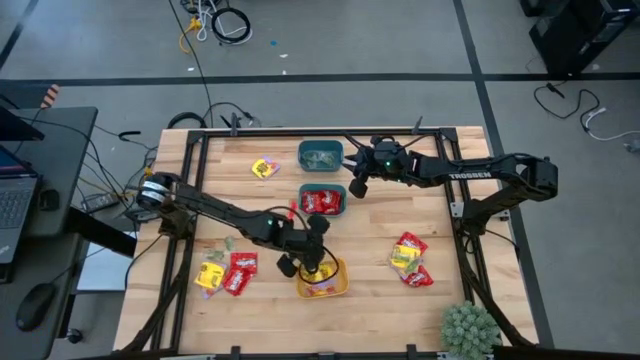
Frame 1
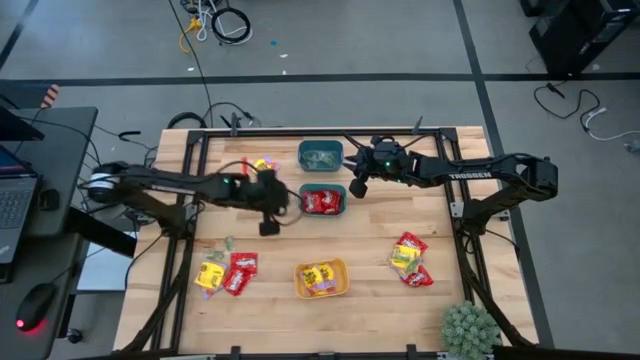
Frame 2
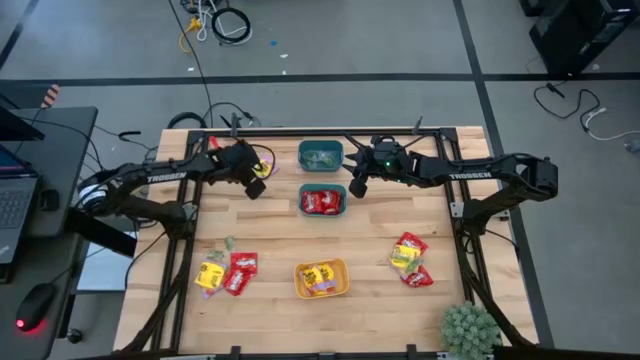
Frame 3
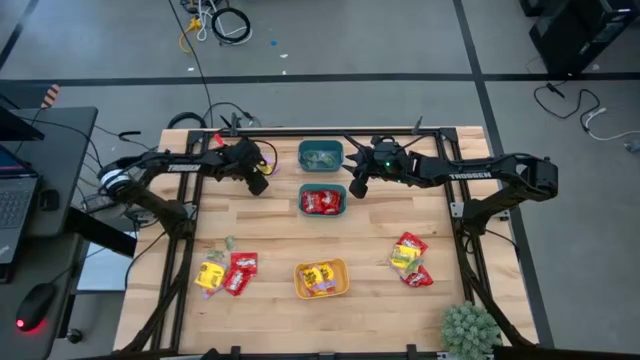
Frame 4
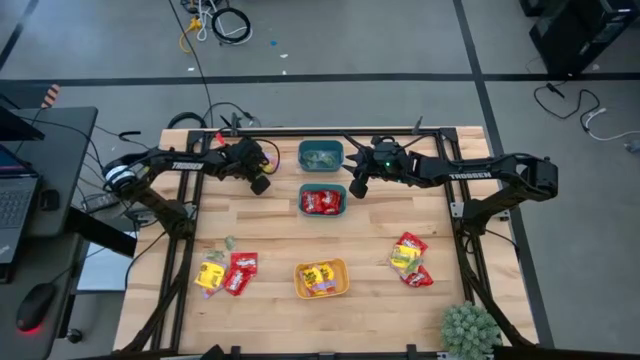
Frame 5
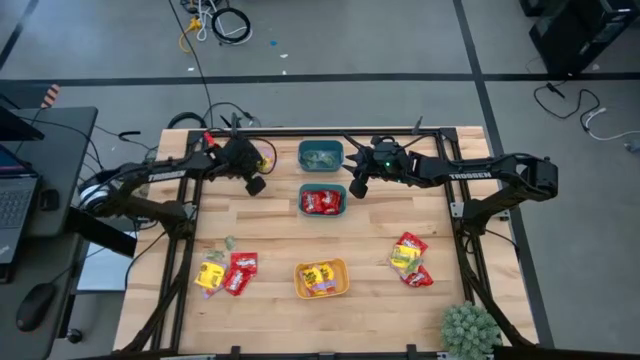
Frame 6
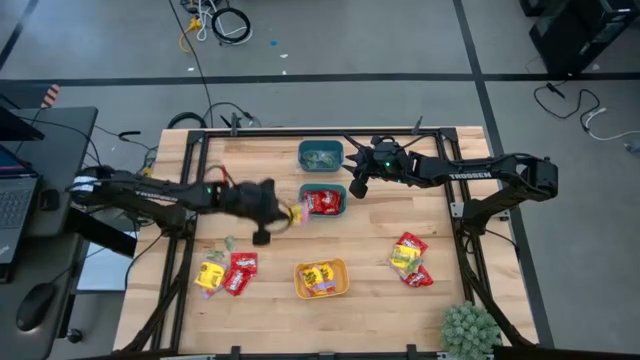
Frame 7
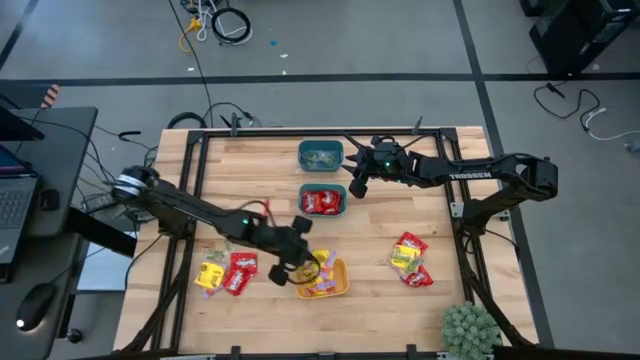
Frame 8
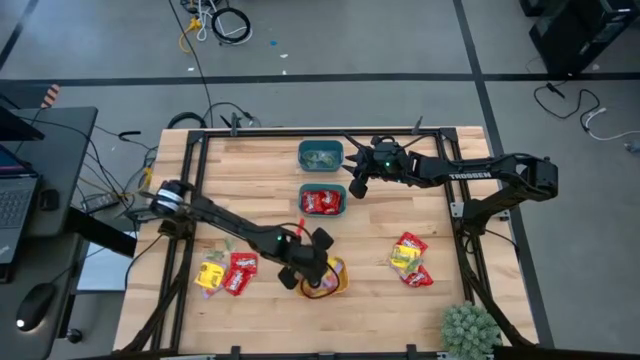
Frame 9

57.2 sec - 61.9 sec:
Task: Sort candy
Put the yellow candy into the yellow bin

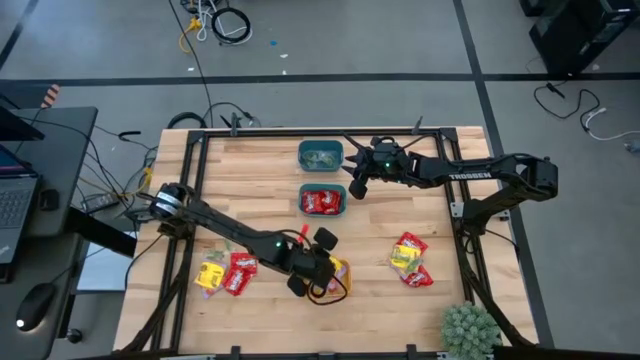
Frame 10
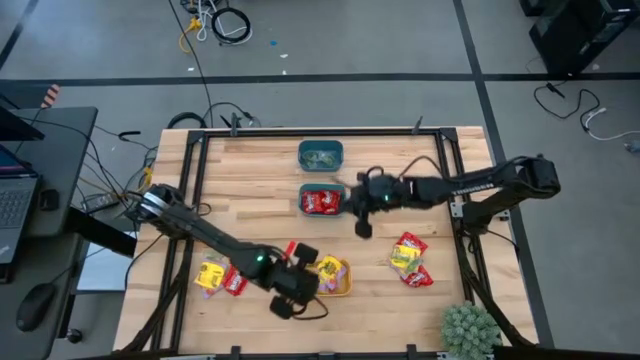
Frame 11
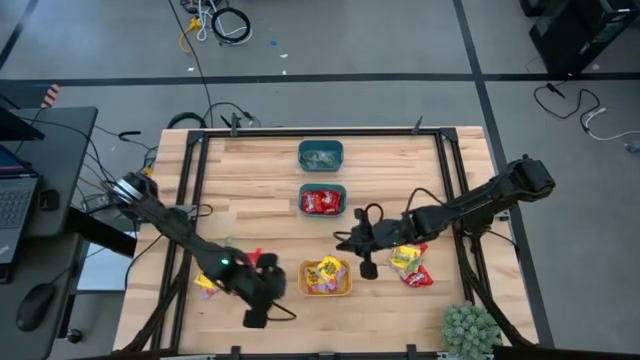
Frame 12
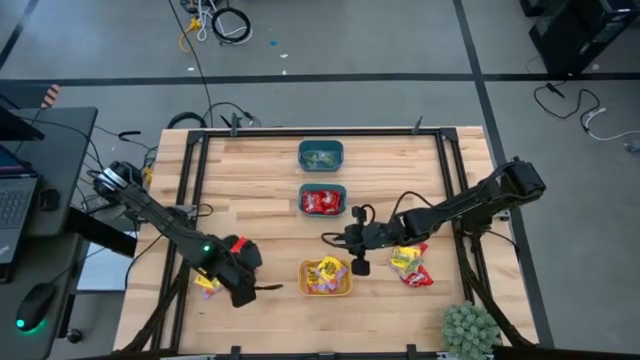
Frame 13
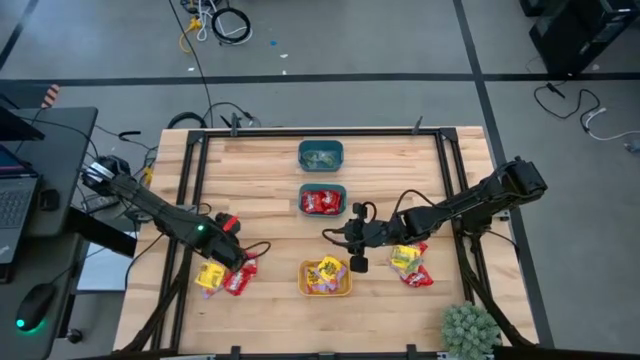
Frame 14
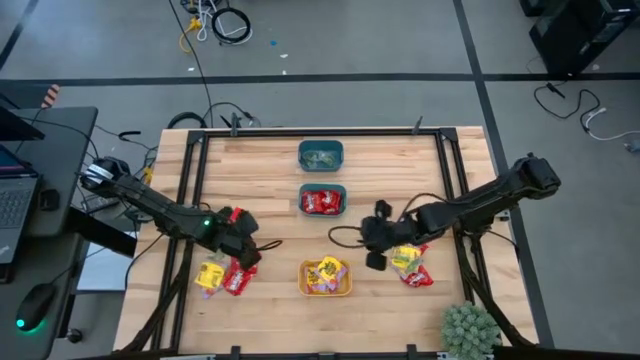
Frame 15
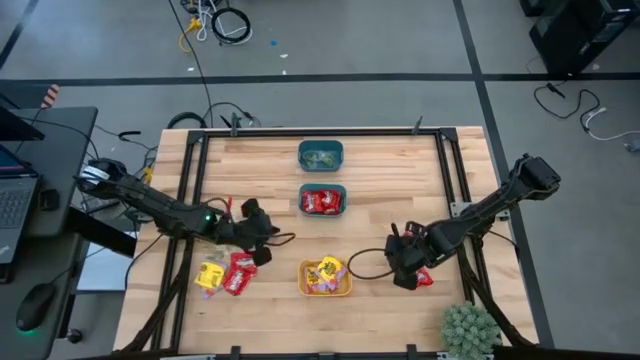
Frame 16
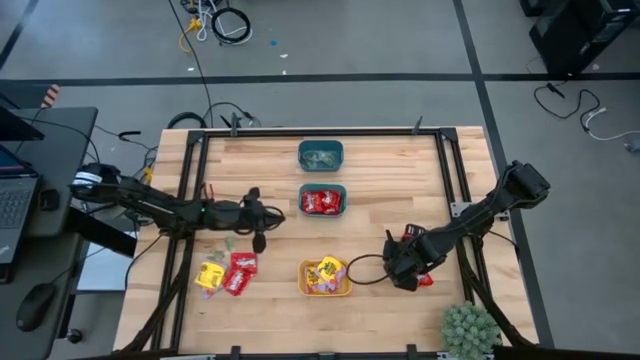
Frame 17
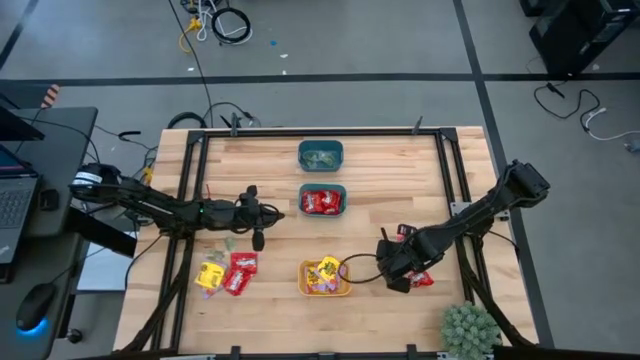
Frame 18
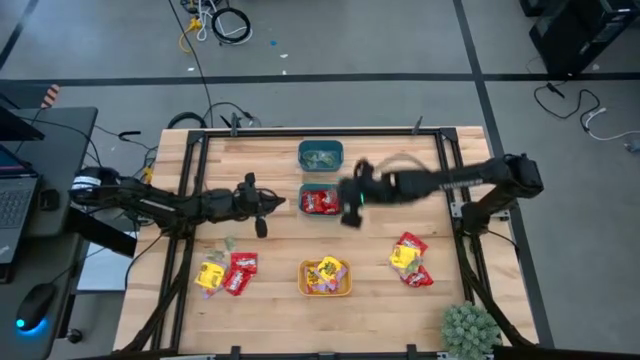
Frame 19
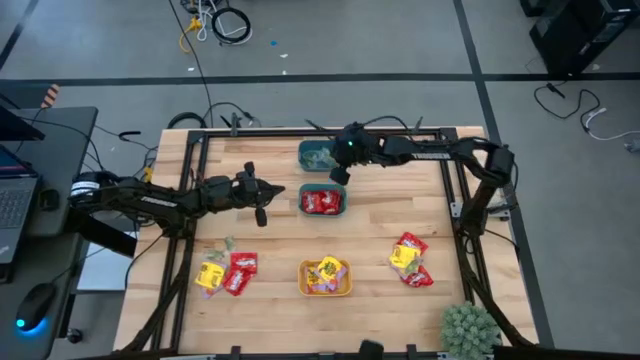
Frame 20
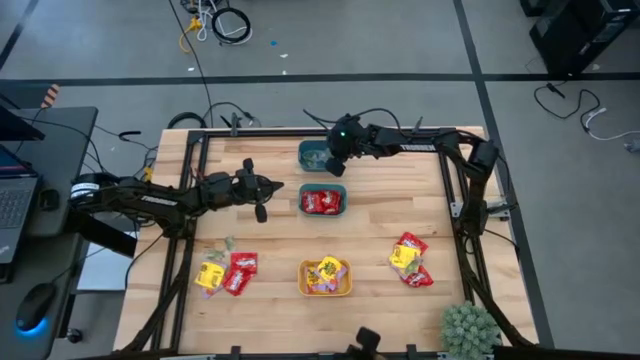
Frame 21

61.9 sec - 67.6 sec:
Put the green gummy into the blue bin

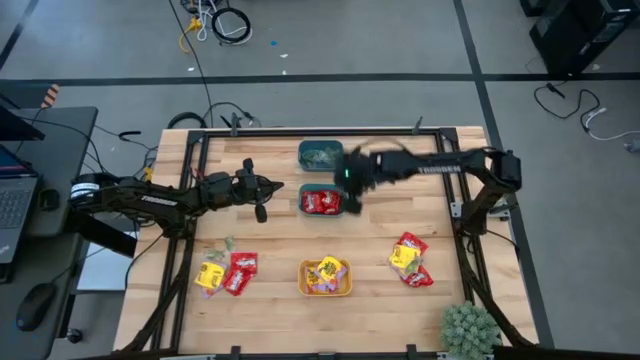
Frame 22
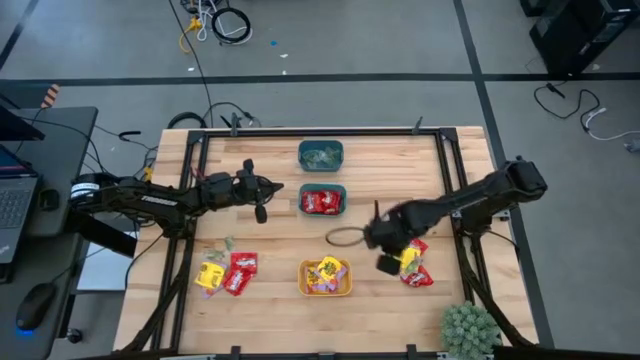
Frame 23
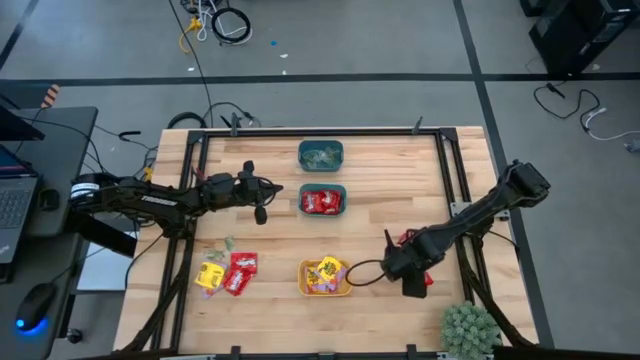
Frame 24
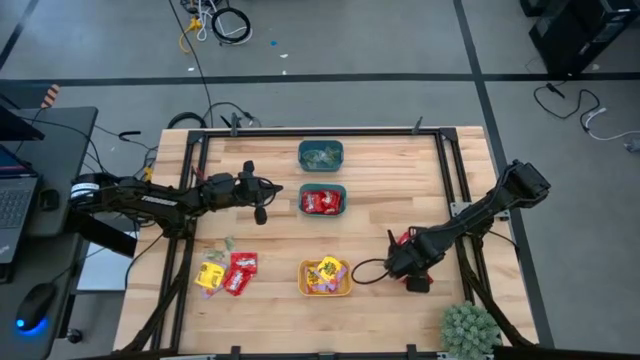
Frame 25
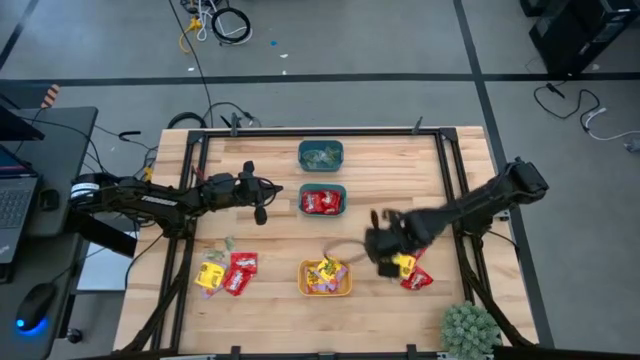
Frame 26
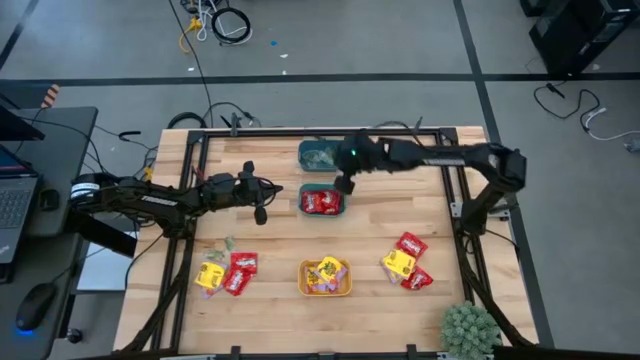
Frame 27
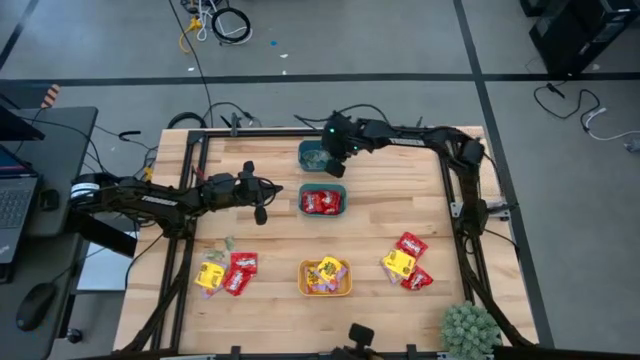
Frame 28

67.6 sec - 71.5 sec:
Put the green gummy into the blue bin

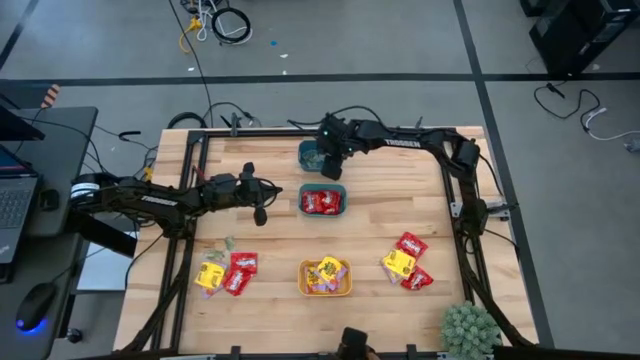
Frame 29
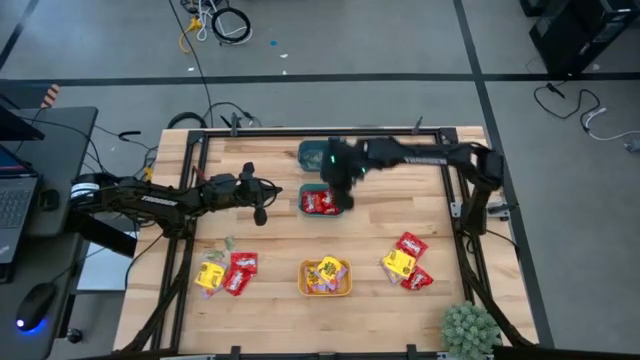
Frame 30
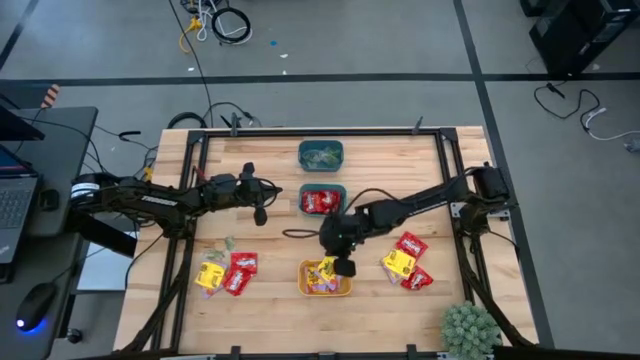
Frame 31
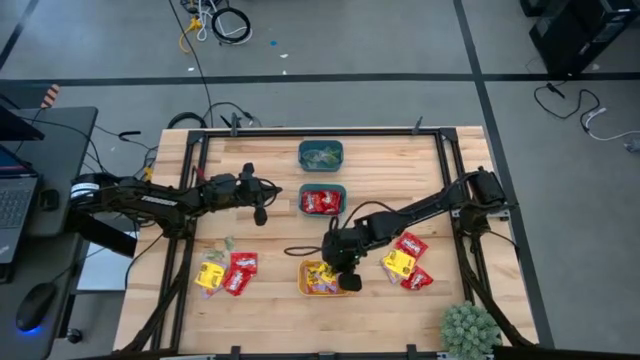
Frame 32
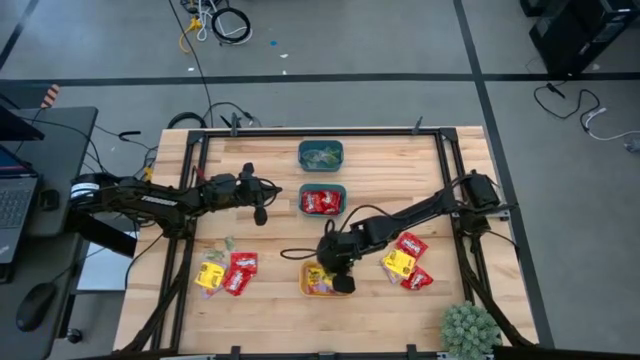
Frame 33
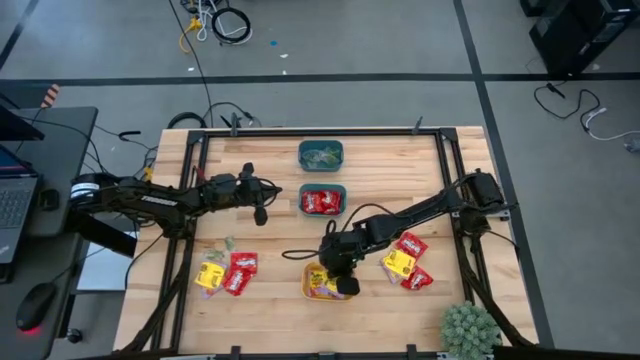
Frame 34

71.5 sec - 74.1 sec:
Adjust the yellow candy on the yellow bin

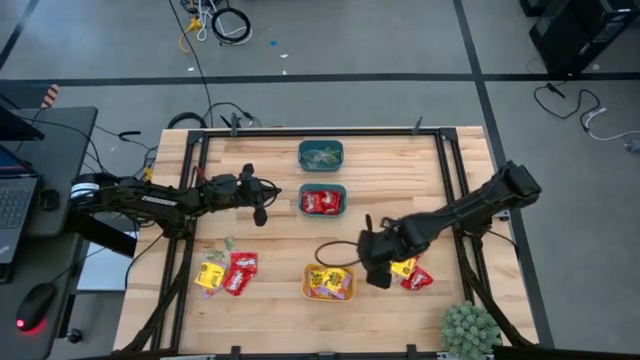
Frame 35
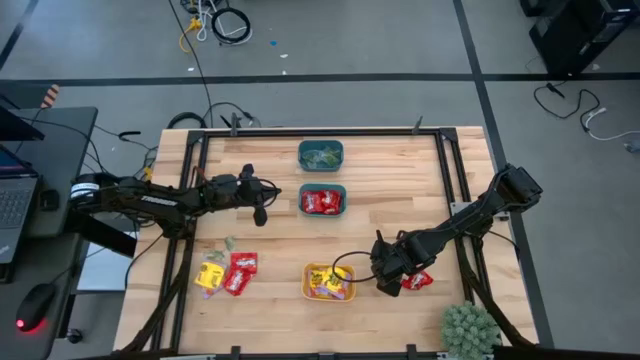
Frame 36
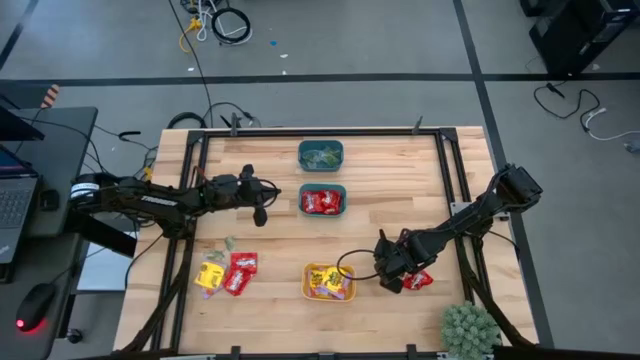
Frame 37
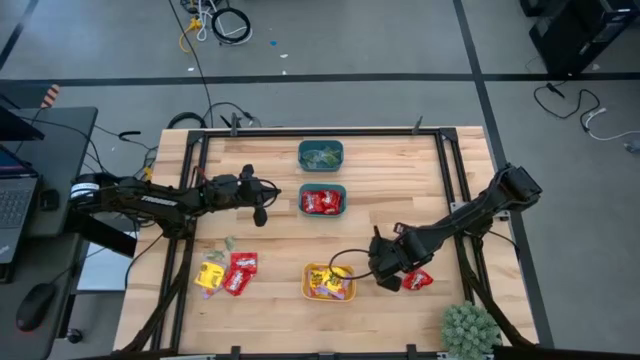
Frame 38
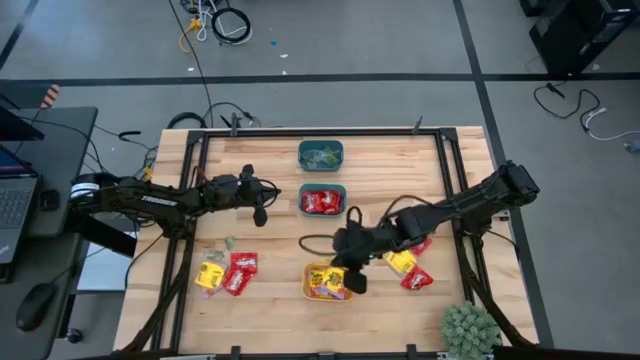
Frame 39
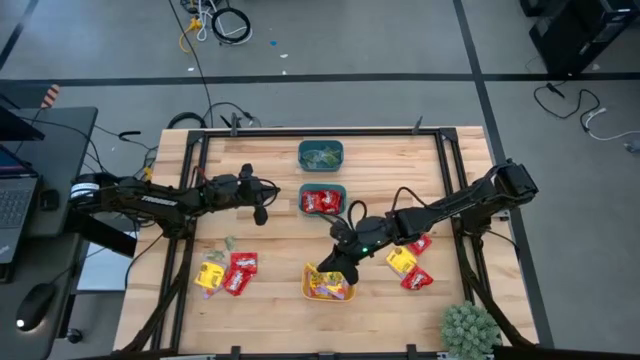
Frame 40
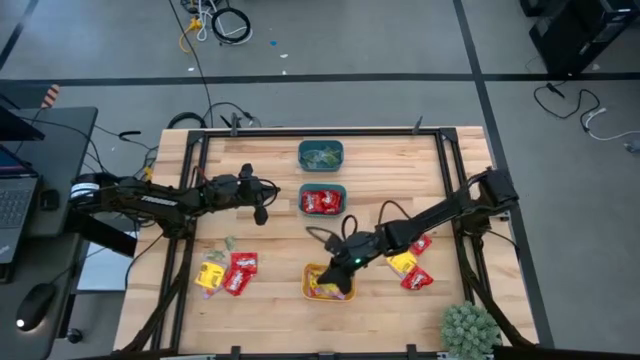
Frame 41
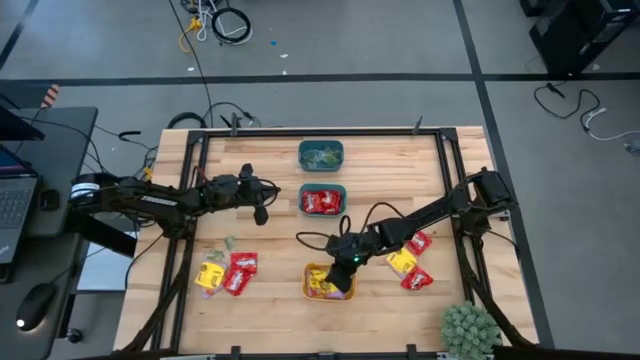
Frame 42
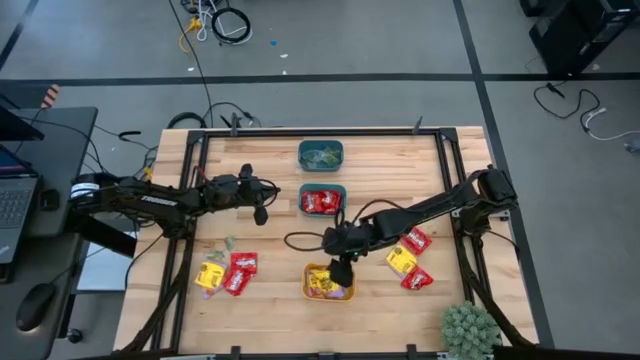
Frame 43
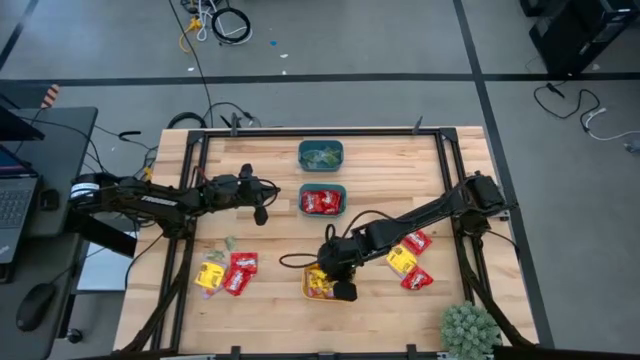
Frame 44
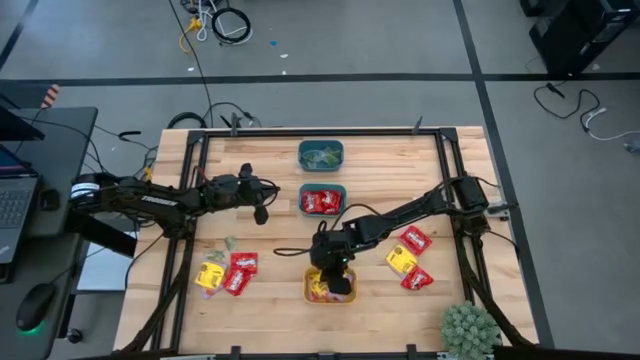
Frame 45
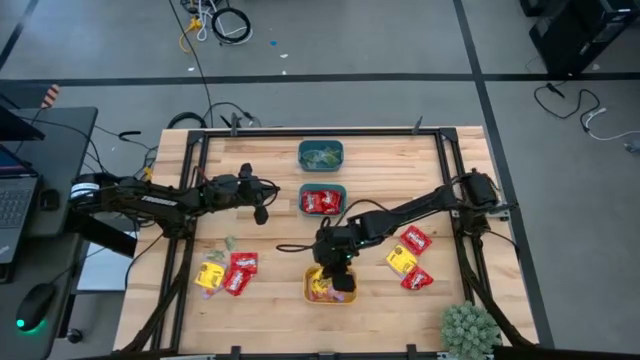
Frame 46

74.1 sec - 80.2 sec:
Put the yellow candy into the yellow bin
